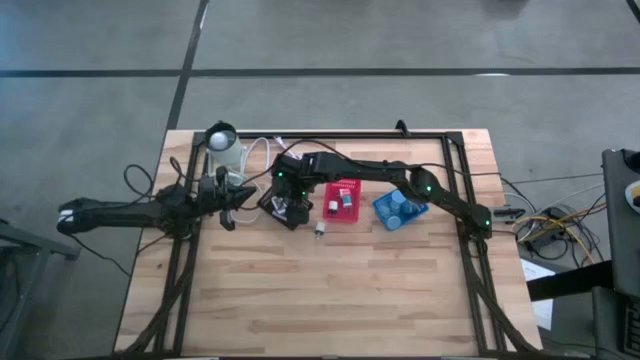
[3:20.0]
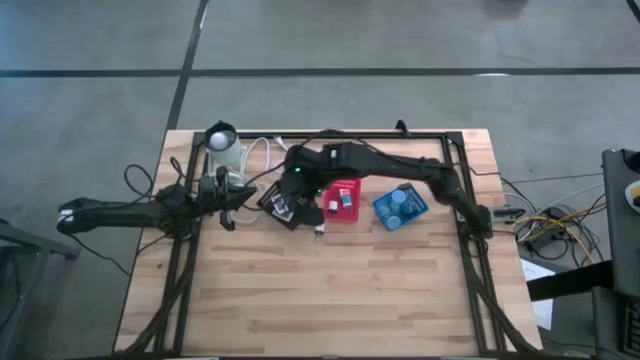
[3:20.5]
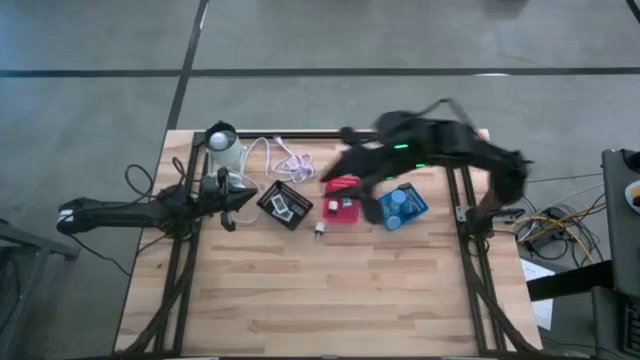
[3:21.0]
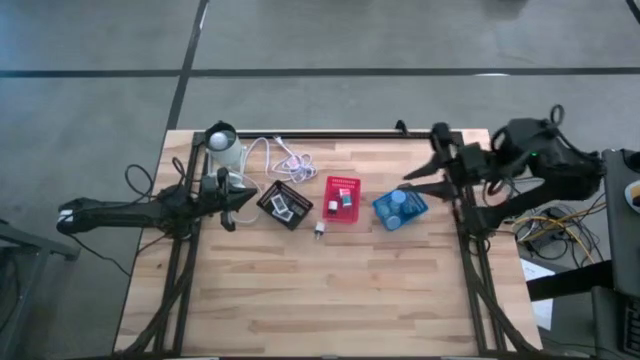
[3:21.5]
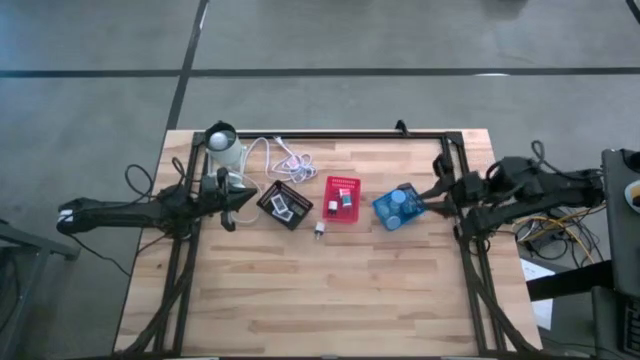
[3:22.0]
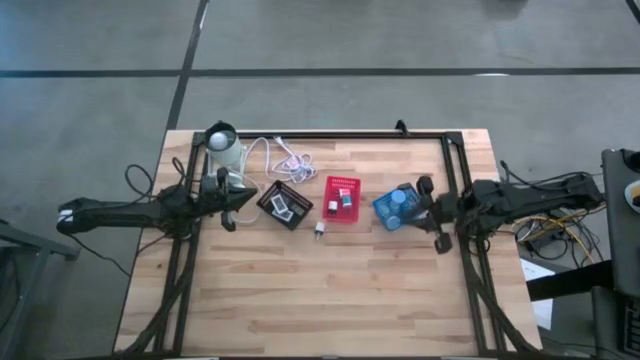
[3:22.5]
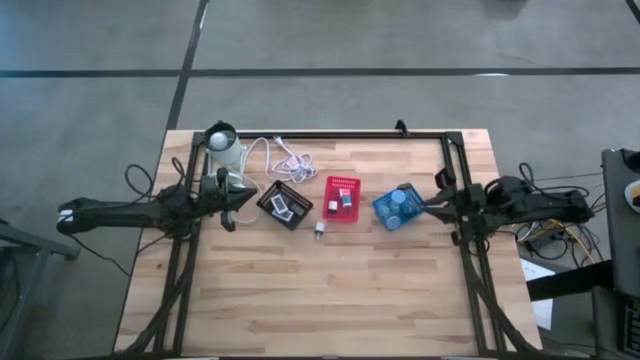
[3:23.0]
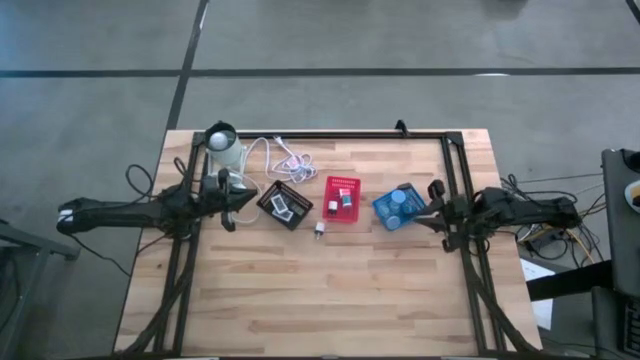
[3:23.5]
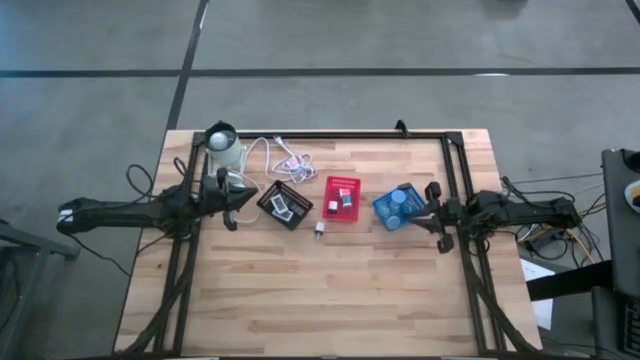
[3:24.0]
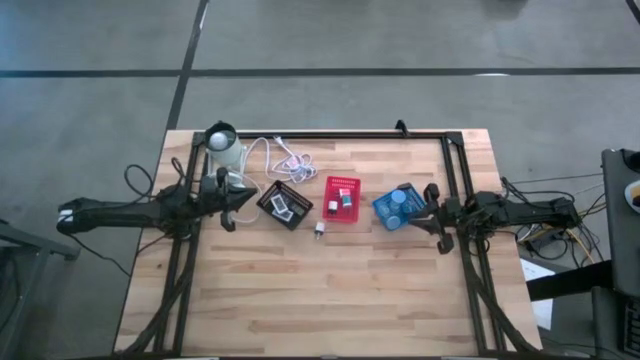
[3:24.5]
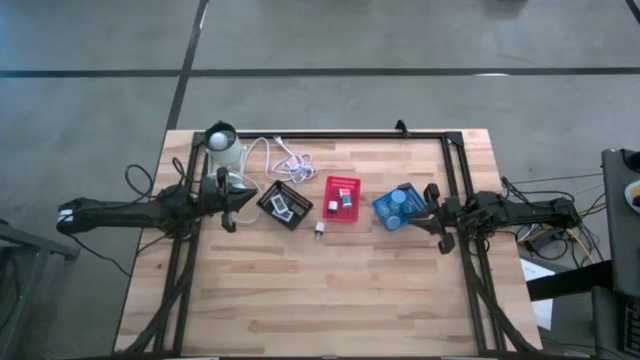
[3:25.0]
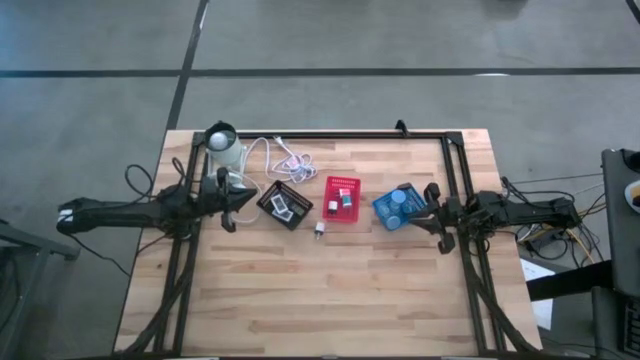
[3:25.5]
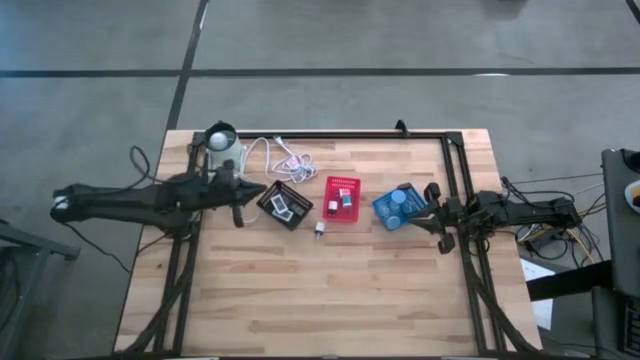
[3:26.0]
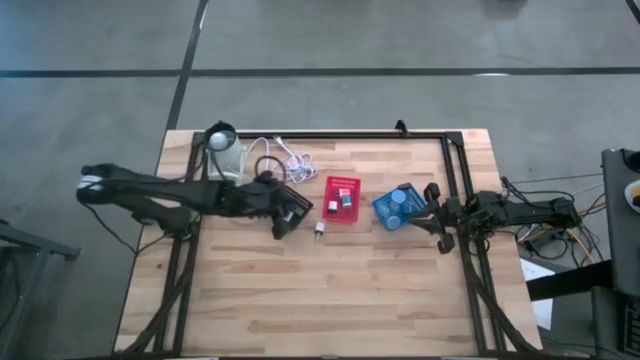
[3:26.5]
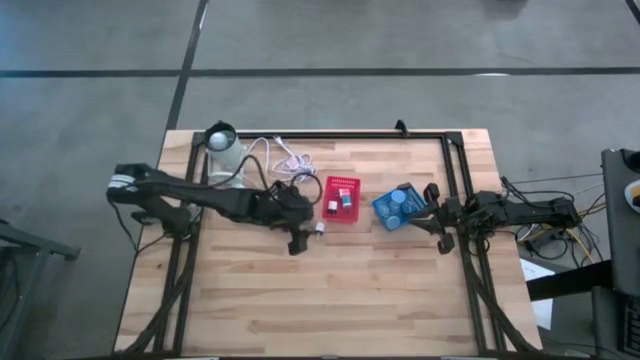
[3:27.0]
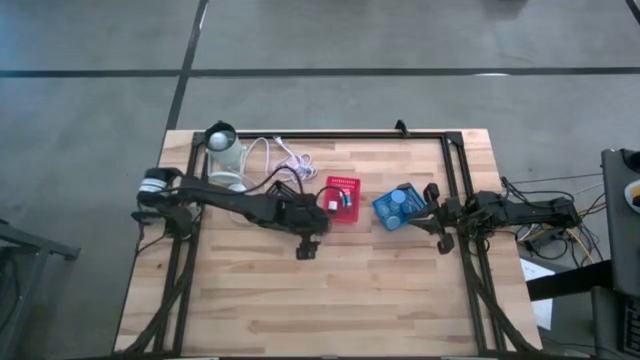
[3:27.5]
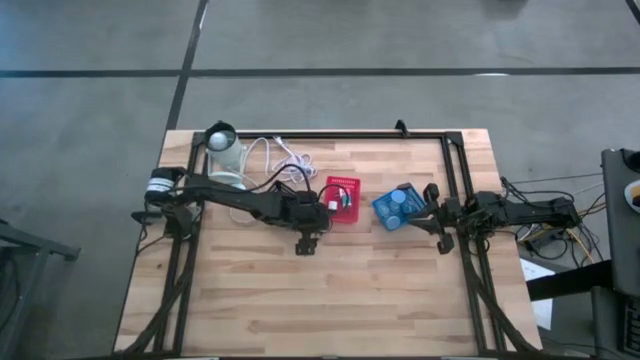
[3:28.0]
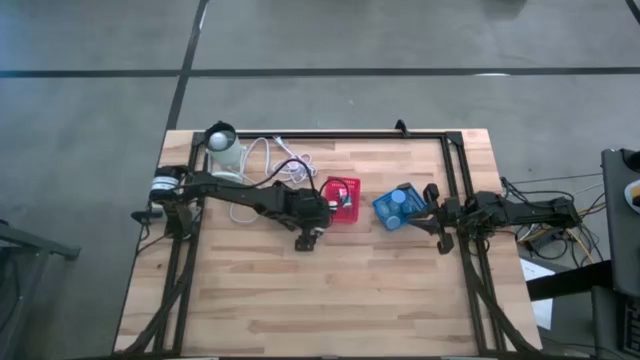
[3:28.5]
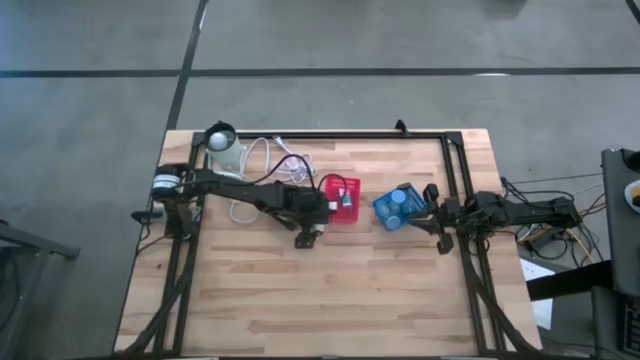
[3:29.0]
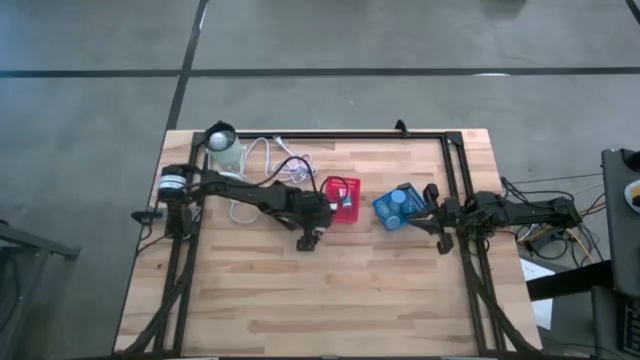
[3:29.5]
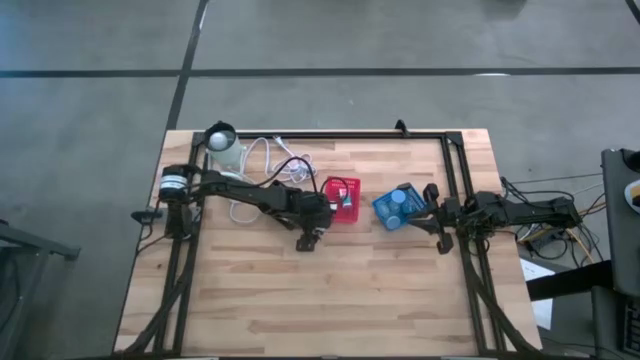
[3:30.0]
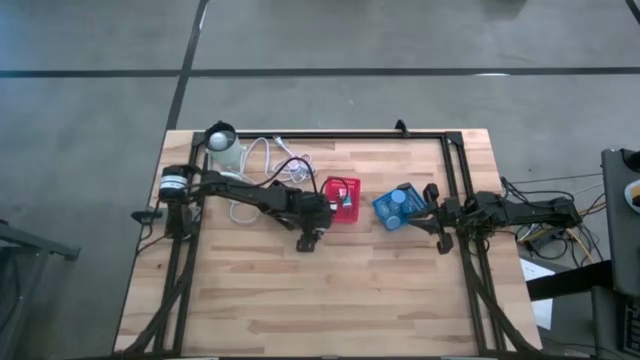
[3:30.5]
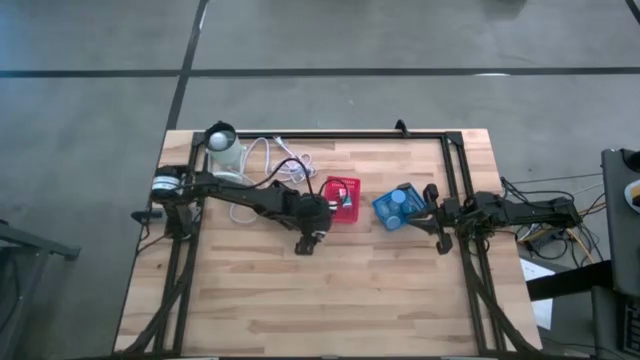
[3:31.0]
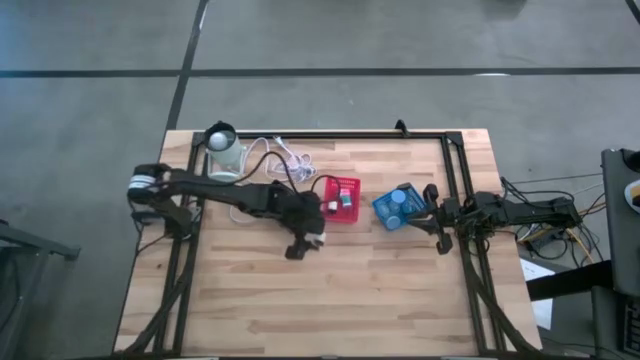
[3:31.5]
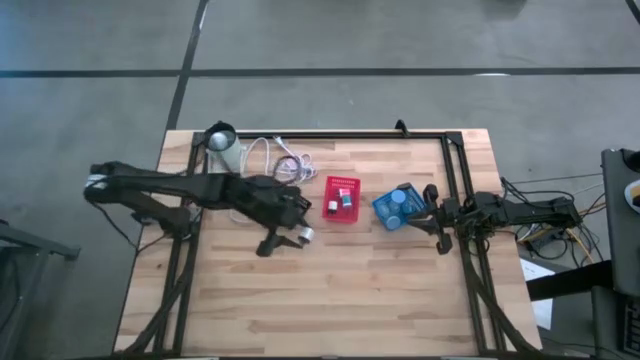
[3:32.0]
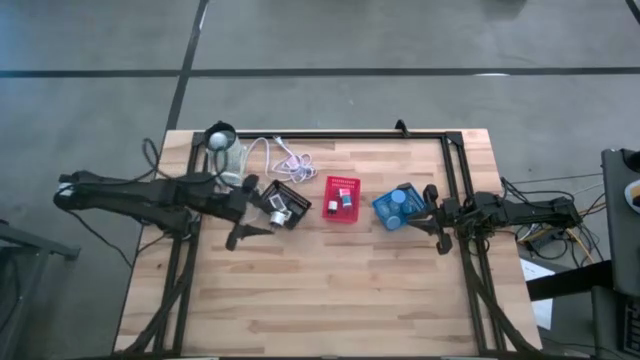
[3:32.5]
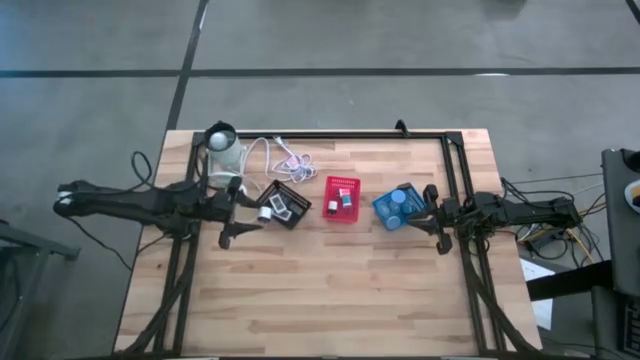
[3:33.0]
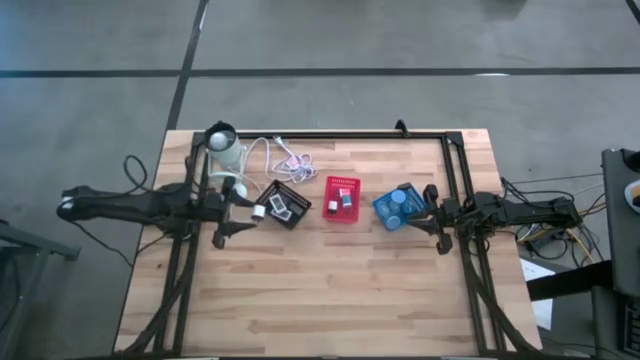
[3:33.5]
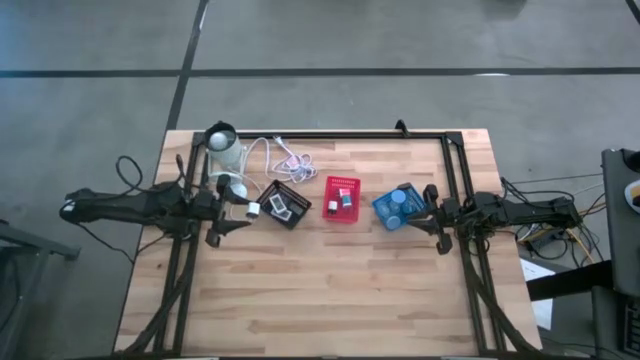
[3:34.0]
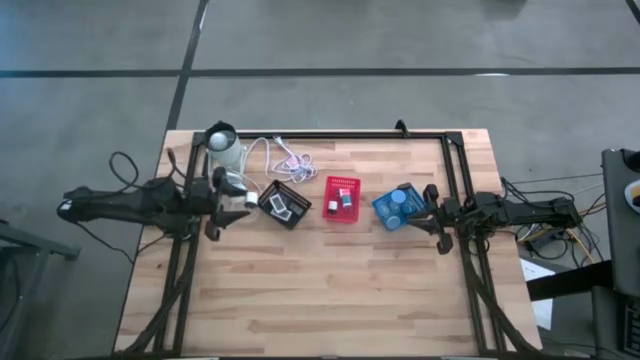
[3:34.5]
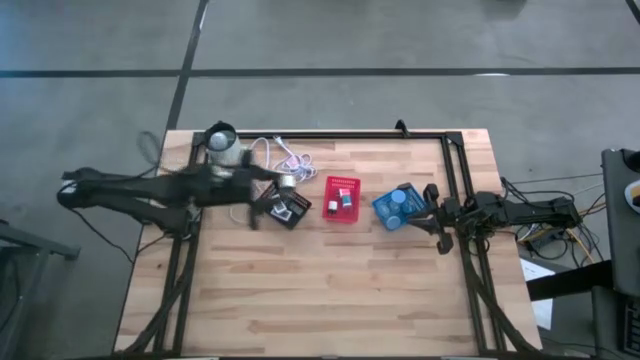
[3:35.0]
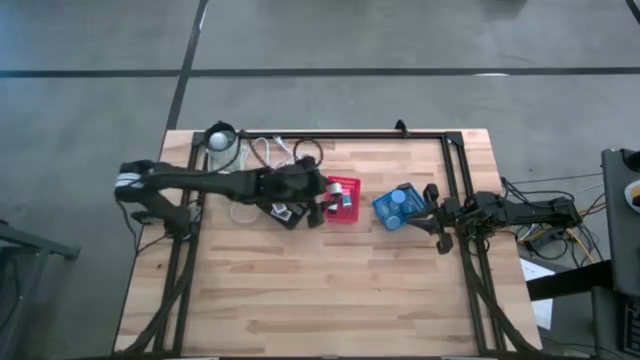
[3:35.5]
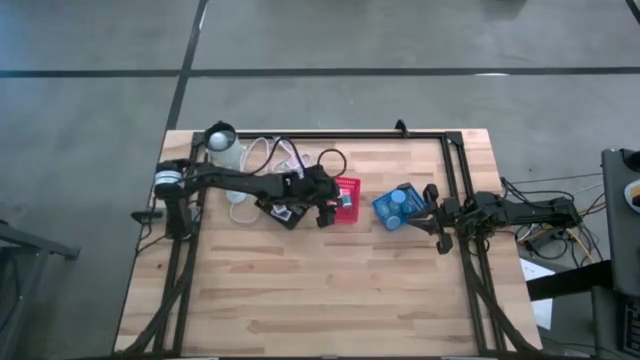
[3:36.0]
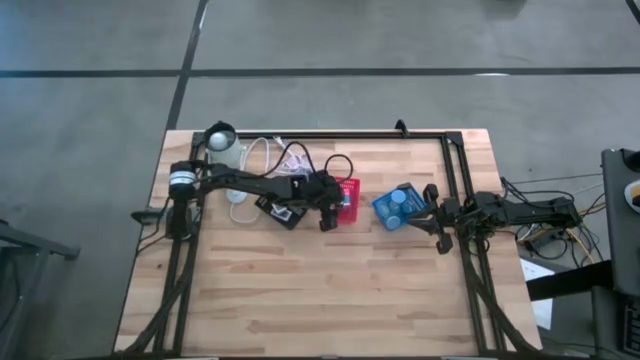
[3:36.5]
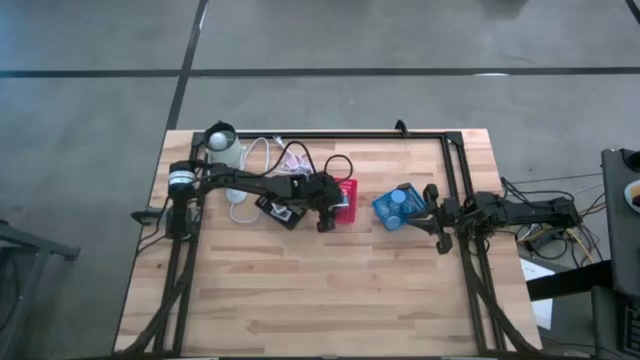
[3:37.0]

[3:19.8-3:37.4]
Task: Pick & Place Office items
Put the white charger adapter into the red basket

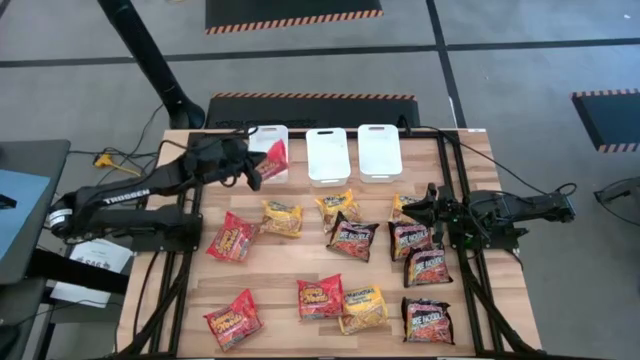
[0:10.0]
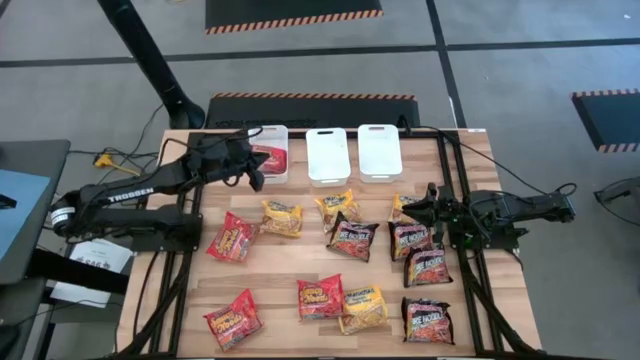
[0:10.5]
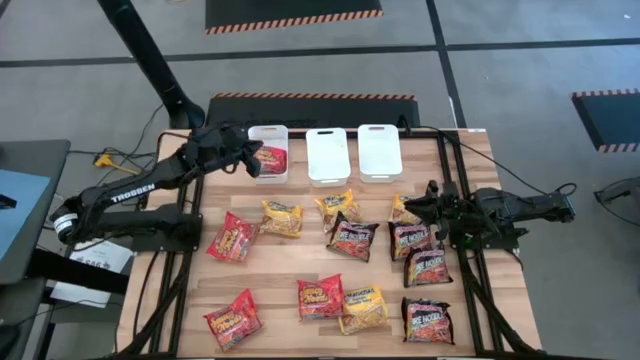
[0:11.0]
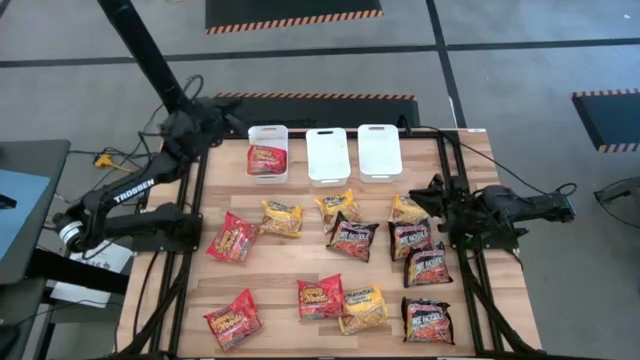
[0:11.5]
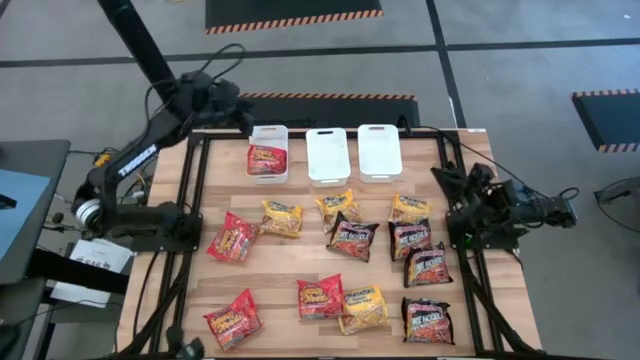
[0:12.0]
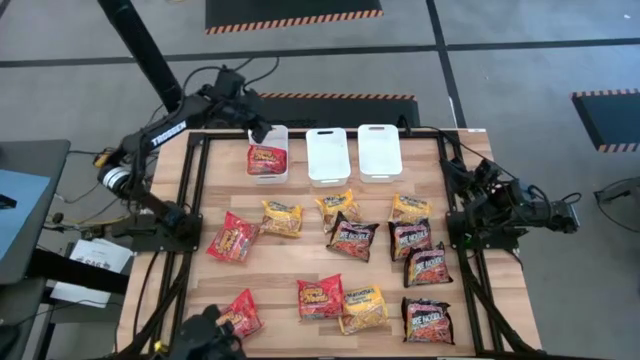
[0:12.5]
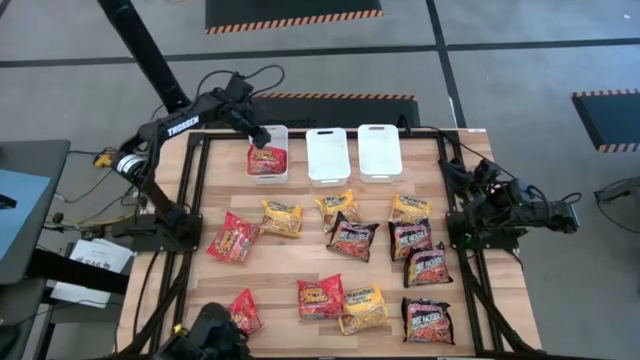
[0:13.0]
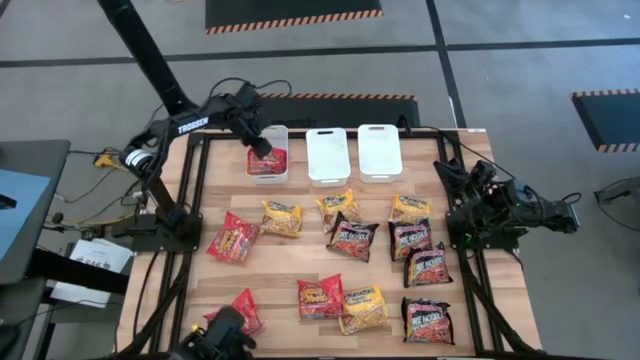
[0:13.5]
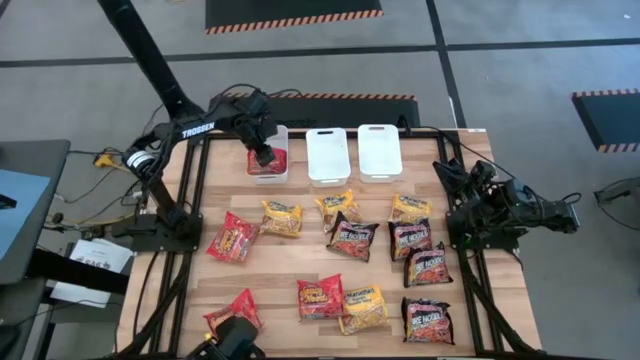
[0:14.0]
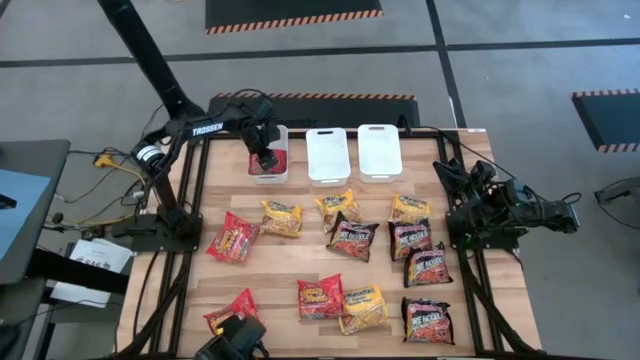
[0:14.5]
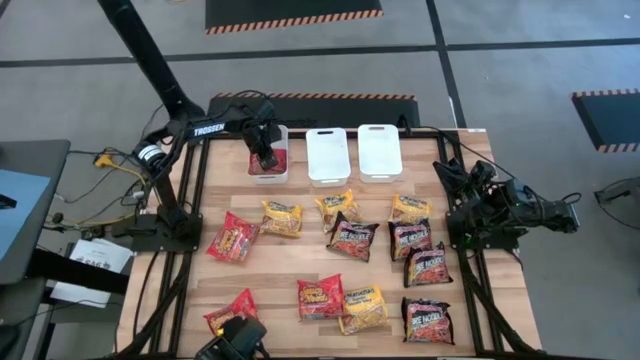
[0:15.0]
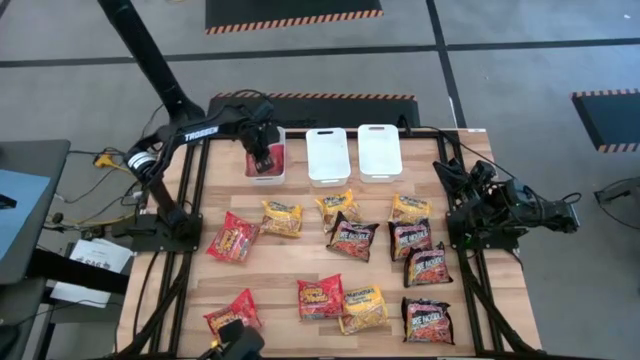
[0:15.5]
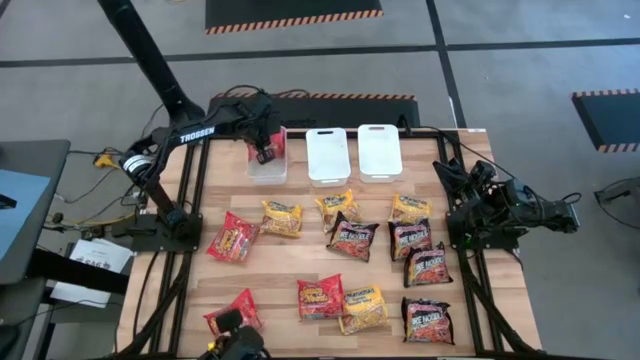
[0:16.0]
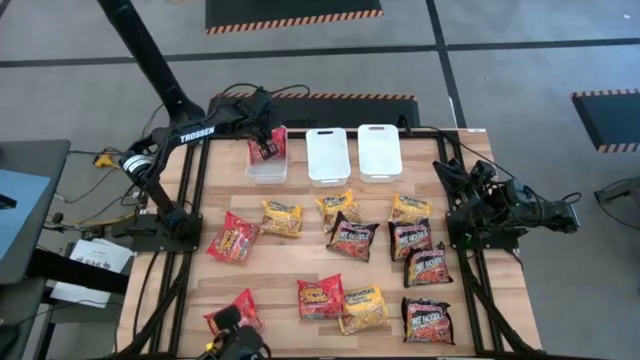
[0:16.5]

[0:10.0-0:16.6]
Task: Sort Maruchan noodles
Put the orange noodle pack into the left white bin
